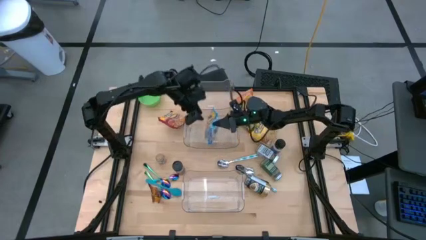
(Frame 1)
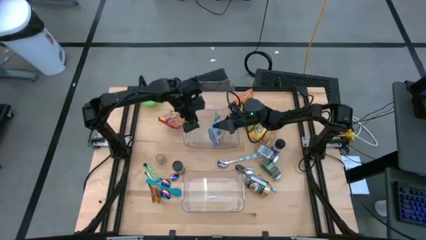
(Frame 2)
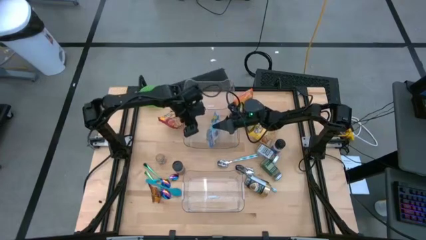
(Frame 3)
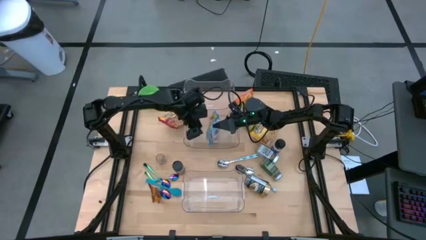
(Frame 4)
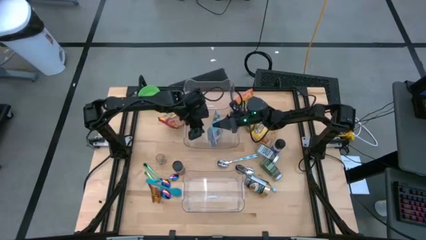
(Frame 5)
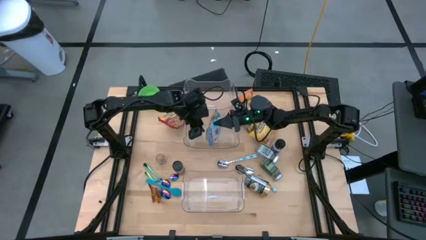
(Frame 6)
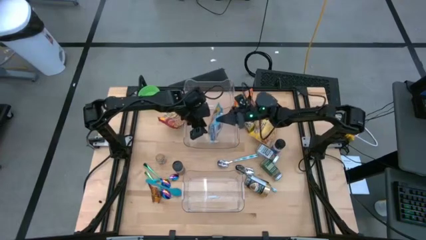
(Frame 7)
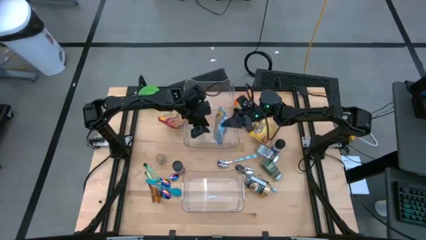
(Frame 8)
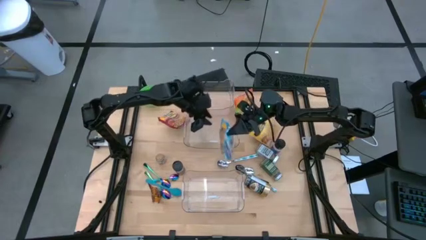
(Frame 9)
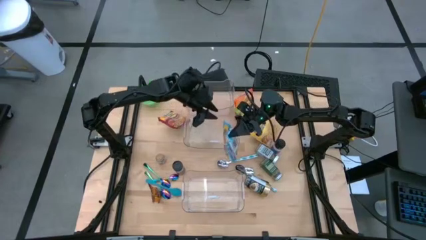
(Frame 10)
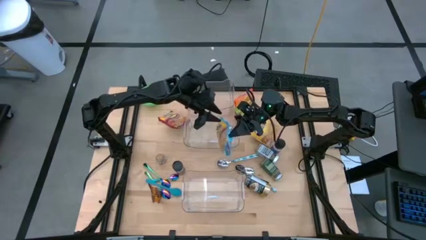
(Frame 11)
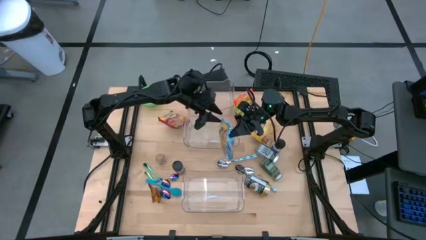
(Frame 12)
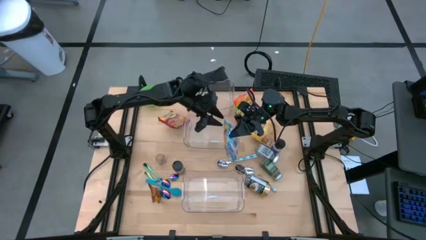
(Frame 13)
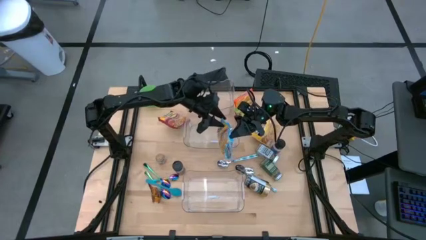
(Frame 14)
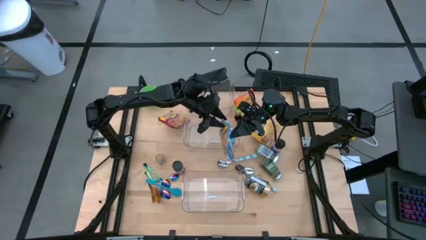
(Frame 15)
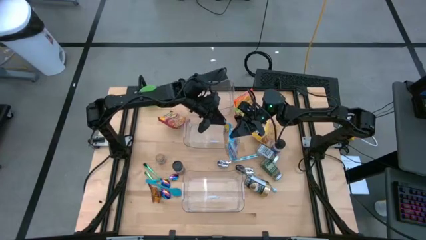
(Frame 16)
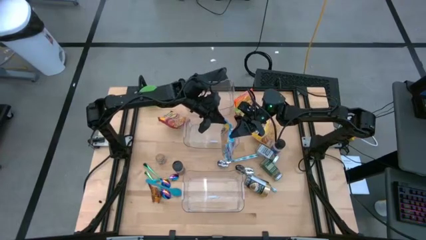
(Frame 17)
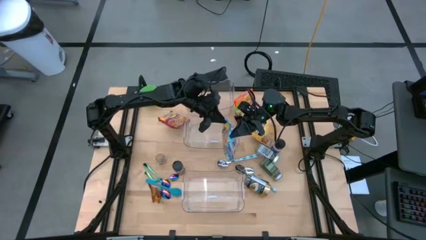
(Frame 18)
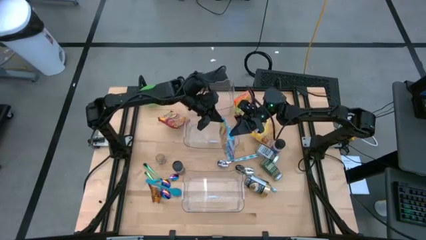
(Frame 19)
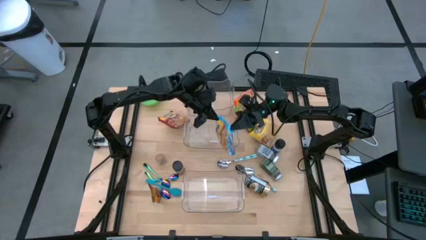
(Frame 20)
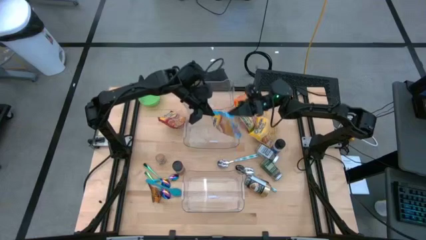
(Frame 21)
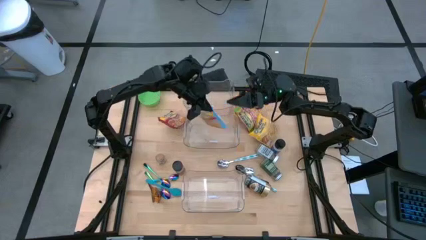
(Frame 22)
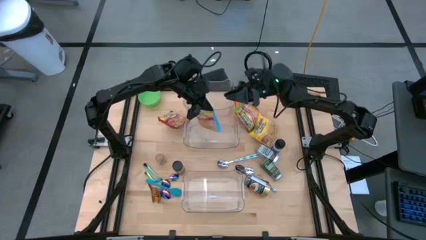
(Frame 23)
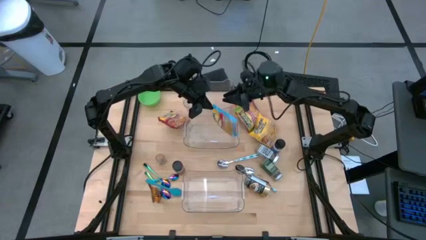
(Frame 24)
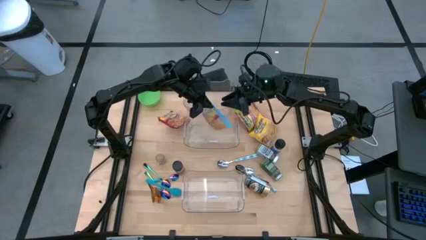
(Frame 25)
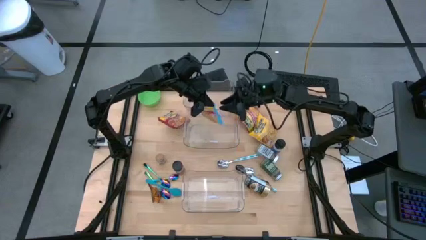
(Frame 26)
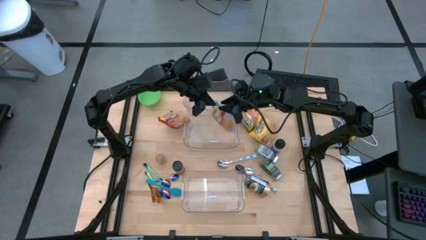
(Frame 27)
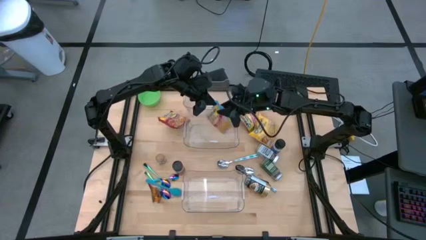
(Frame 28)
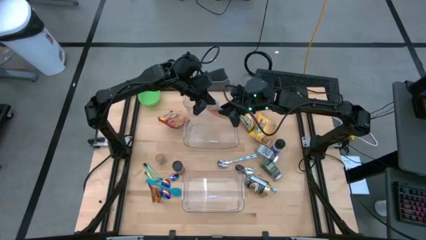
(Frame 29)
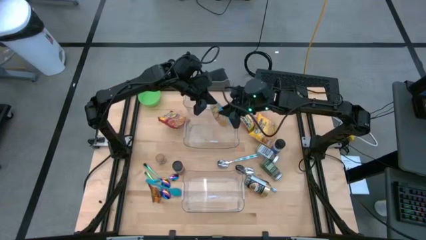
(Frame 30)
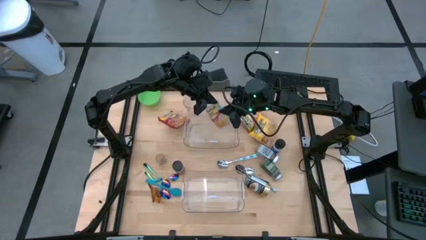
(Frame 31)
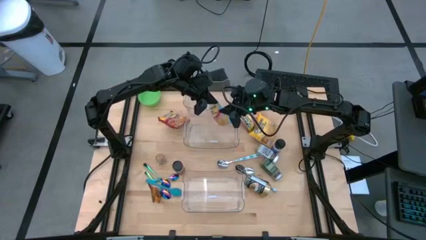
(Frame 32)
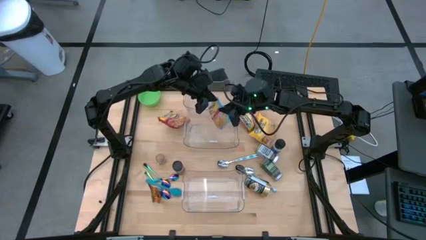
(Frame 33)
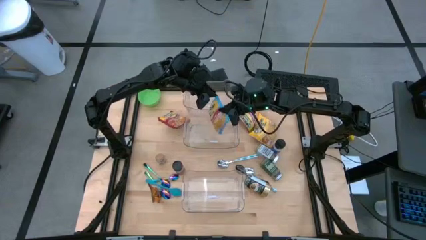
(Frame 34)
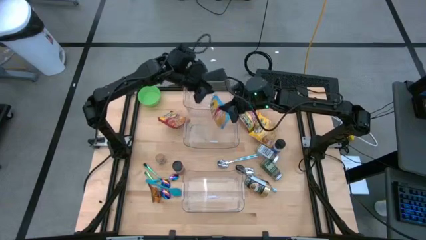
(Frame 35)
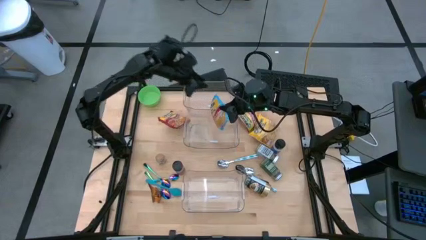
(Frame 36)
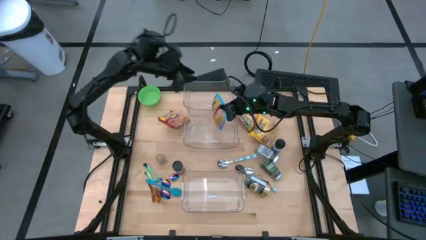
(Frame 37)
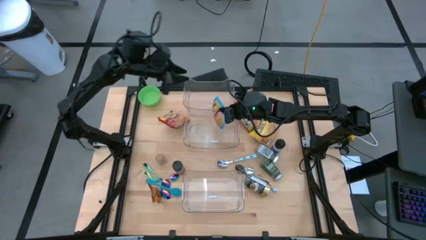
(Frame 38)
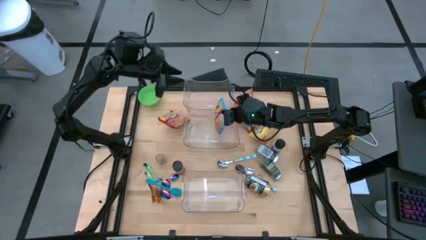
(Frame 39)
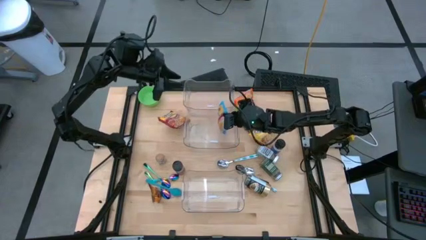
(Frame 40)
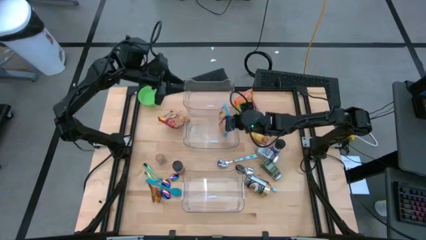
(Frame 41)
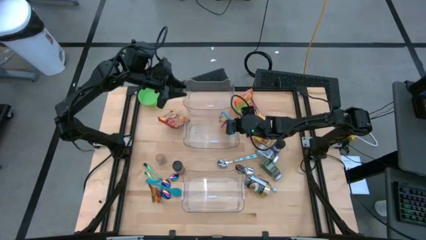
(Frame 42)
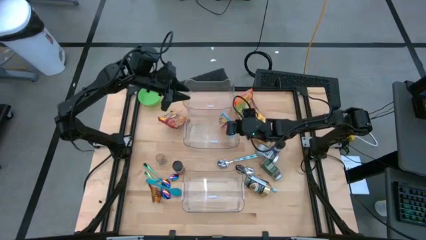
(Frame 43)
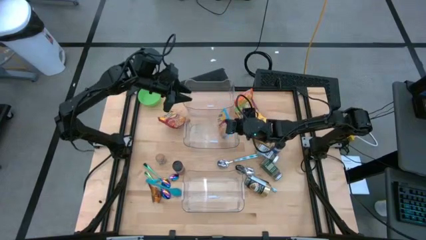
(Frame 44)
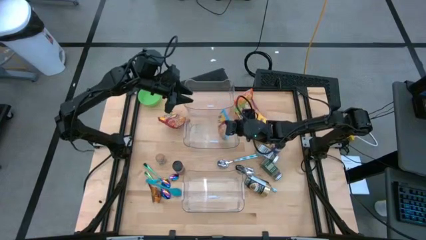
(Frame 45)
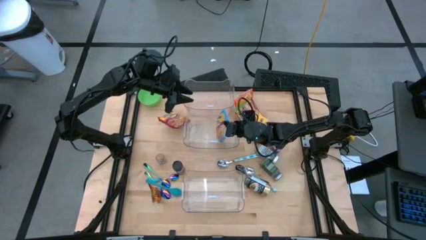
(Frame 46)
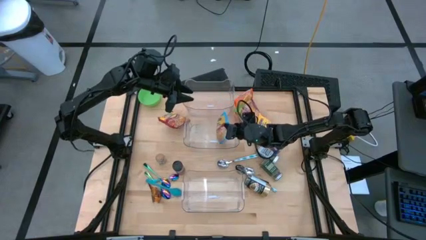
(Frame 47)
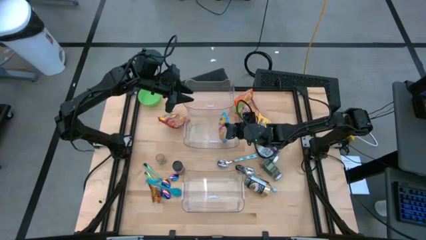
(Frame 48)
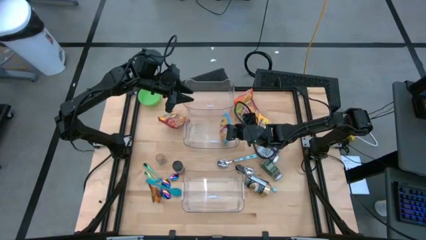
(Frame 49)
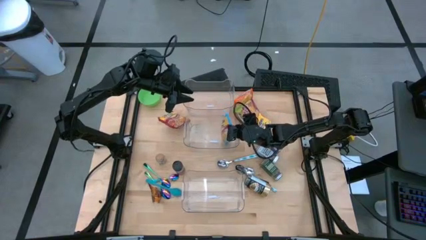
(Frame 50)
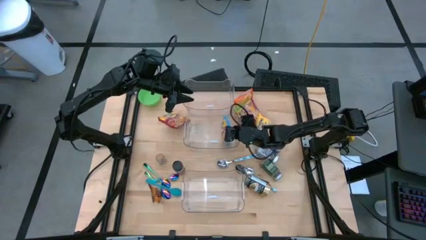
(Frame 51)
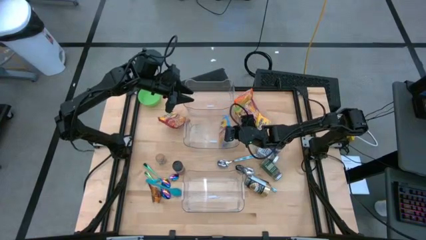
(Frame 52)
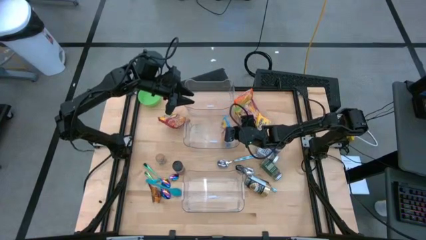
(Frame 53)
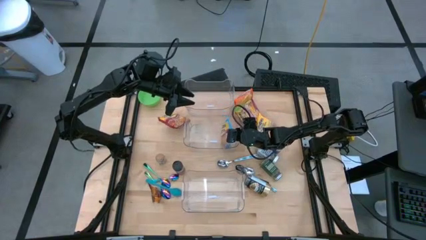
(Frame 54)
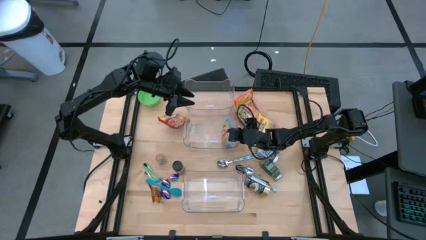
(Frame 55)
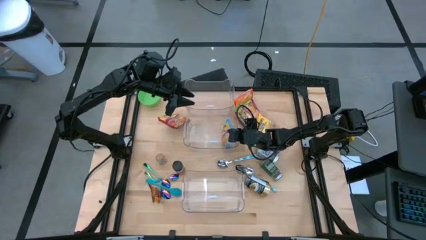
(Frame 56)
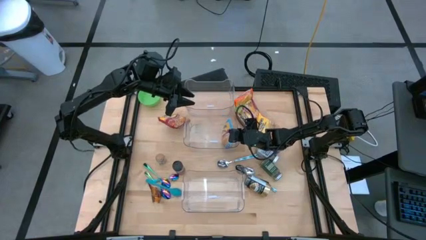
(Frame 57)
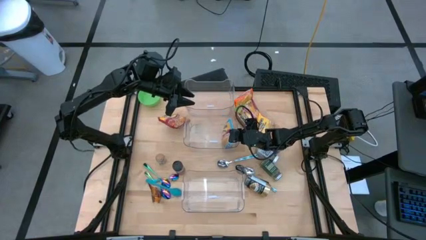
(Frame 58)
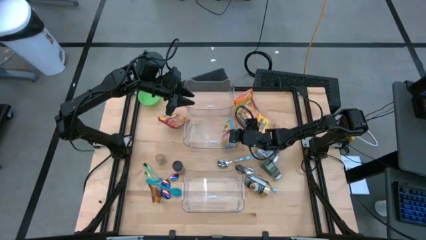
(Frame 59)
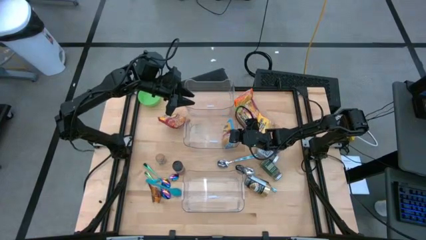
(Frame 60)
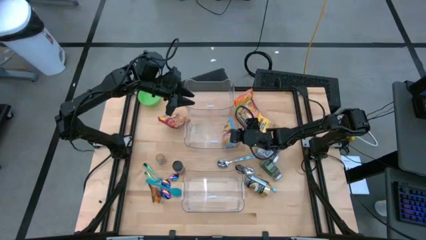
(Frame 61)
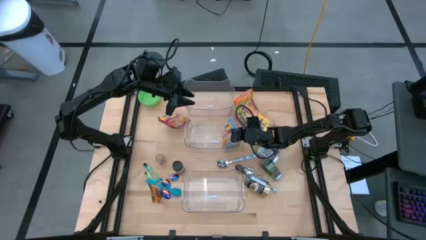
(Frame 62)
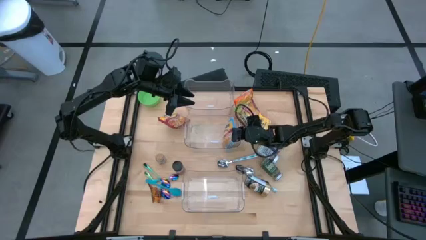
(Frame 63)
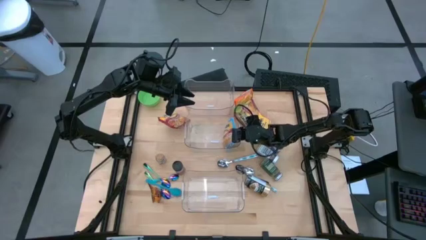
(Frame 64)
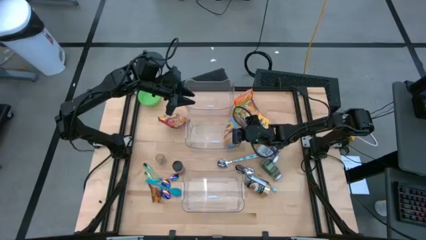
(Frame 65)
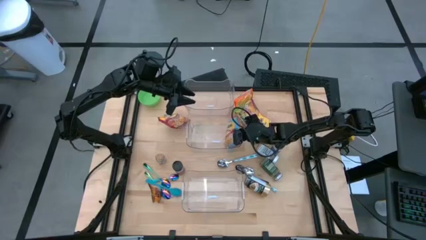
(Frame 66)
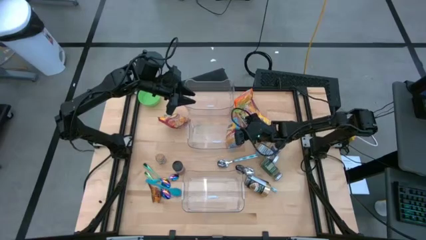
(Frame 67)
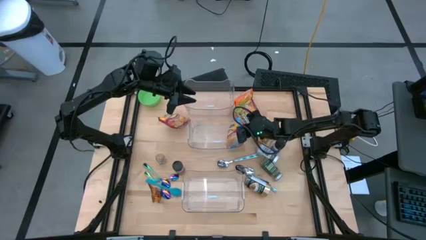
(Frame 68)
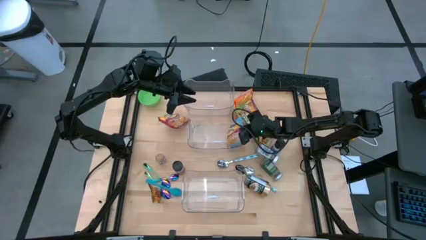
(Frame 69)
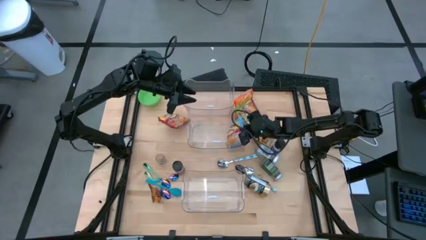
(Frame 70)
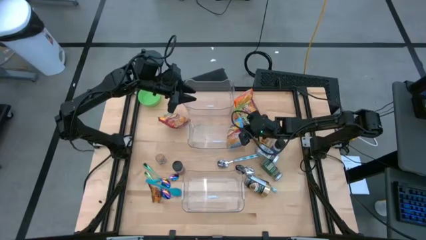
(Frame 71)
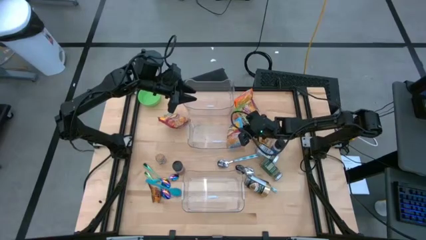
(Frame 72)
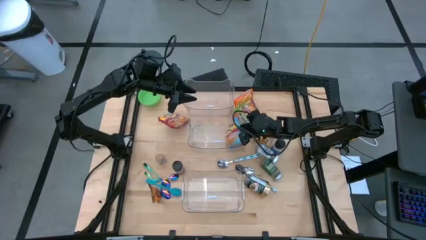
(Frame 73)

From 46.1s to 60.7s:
Task: Pick & Place Food Item
Put the blue noodle pack into the middle transparent bin
